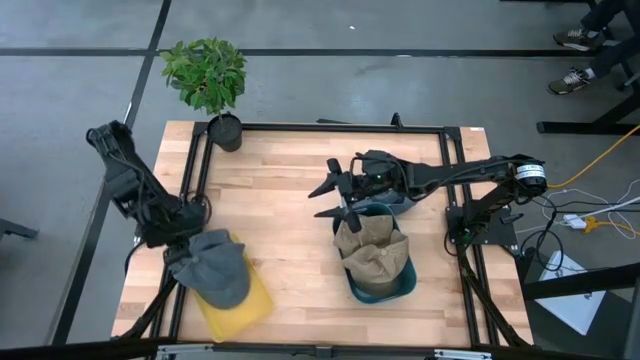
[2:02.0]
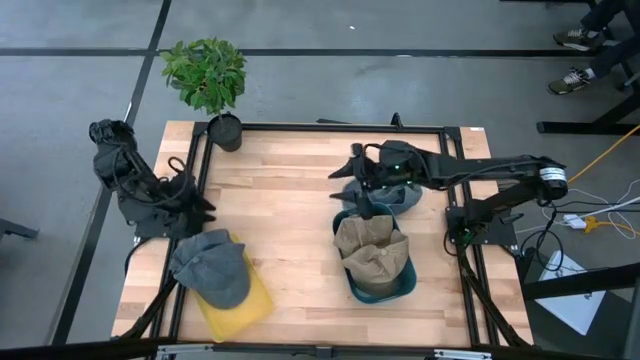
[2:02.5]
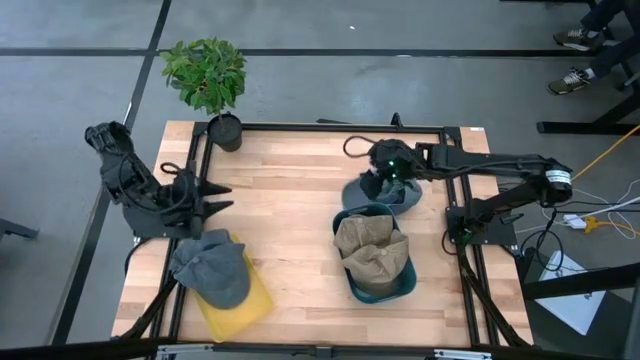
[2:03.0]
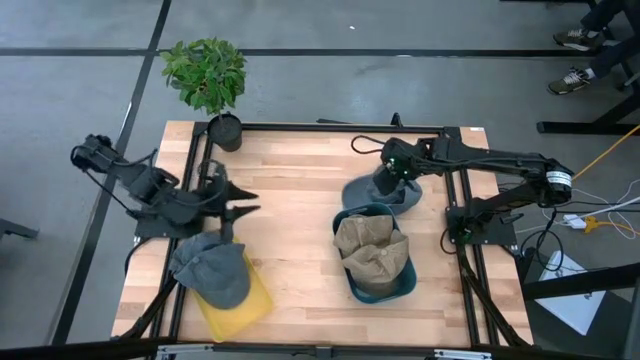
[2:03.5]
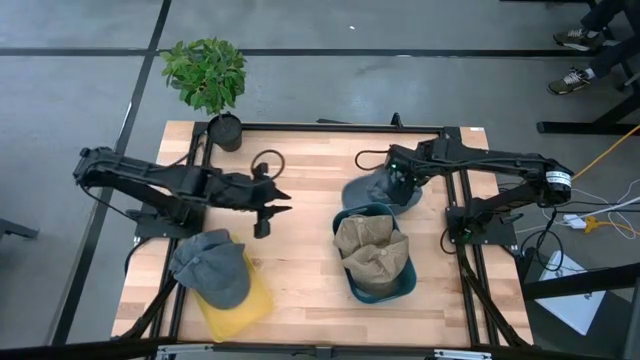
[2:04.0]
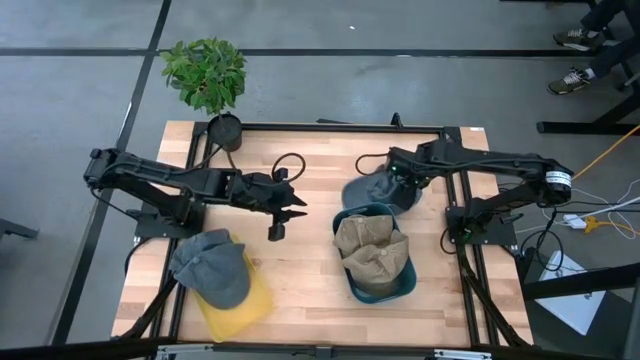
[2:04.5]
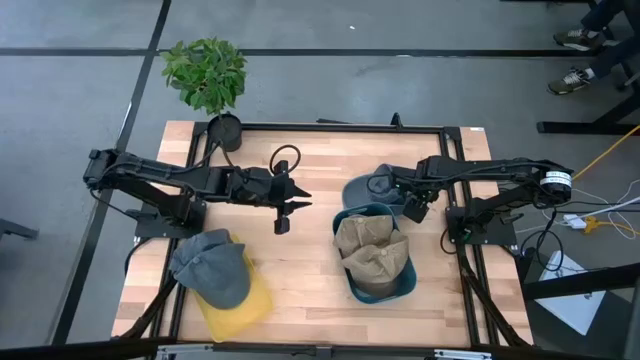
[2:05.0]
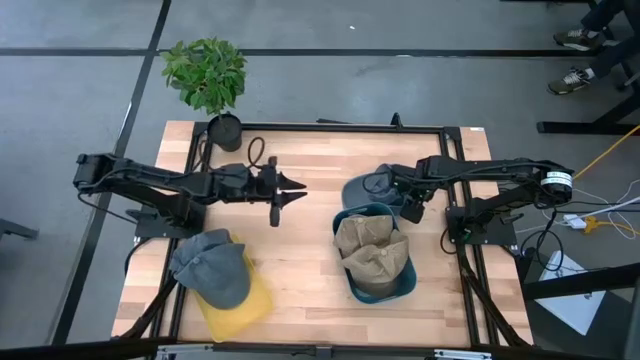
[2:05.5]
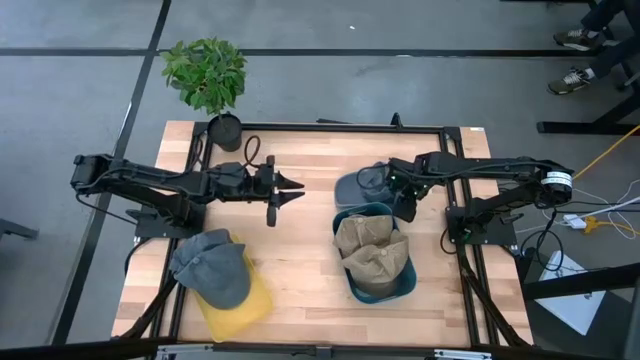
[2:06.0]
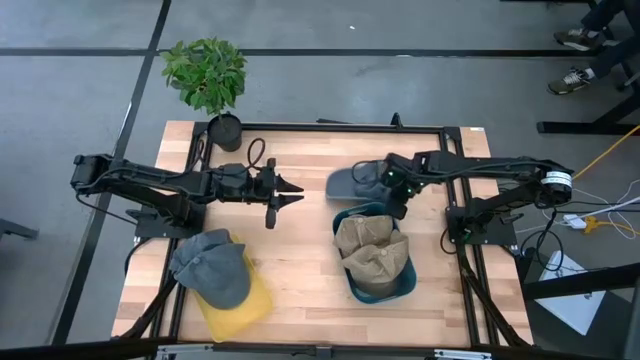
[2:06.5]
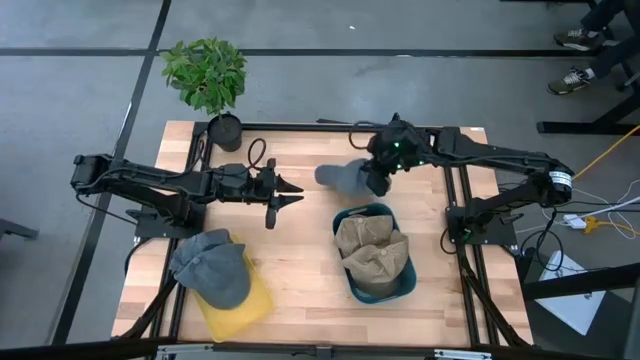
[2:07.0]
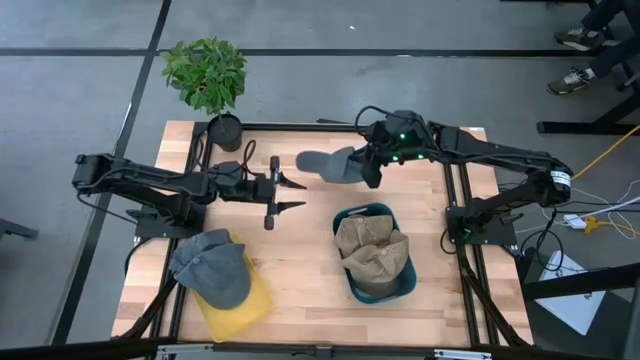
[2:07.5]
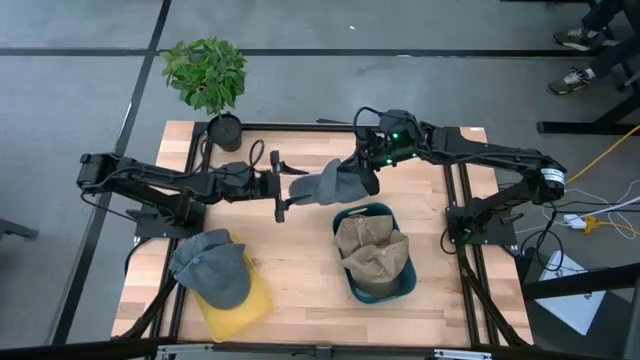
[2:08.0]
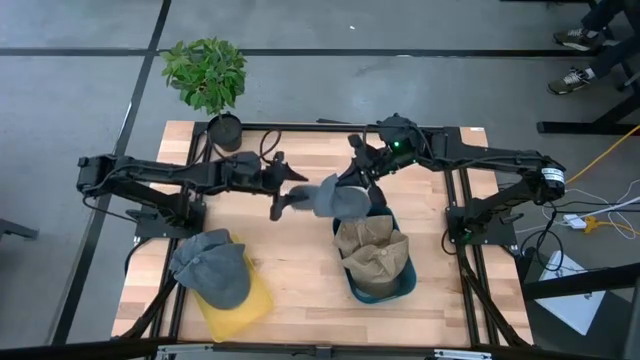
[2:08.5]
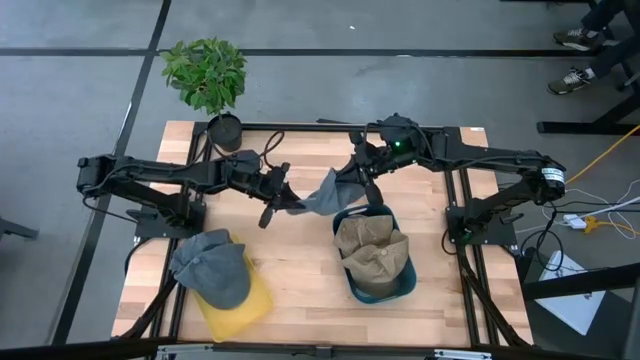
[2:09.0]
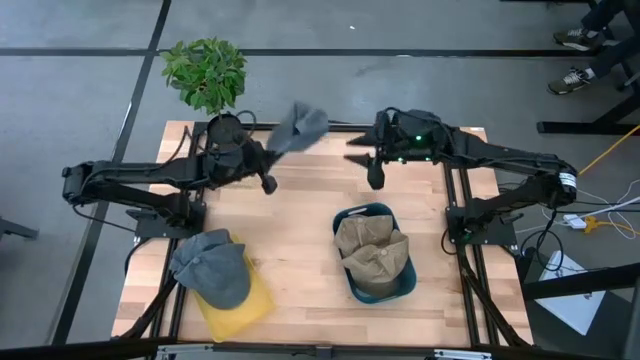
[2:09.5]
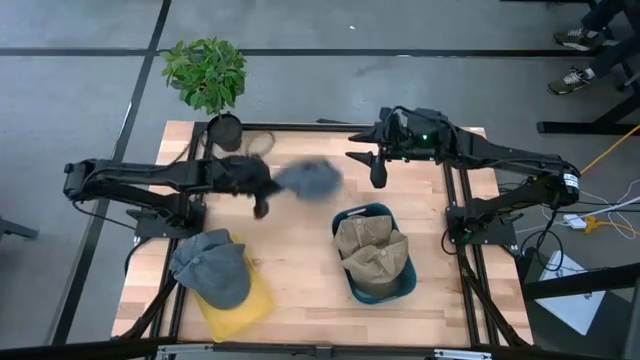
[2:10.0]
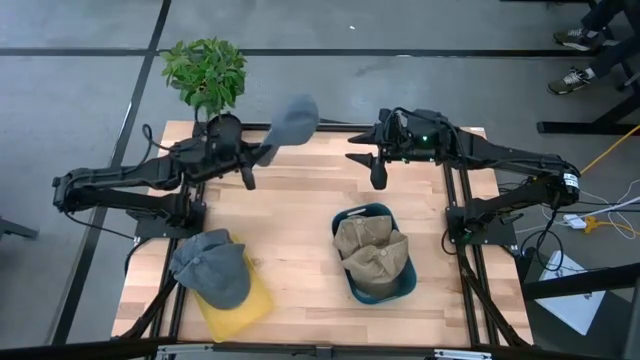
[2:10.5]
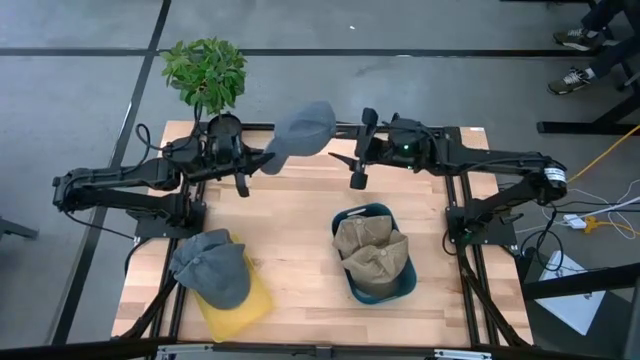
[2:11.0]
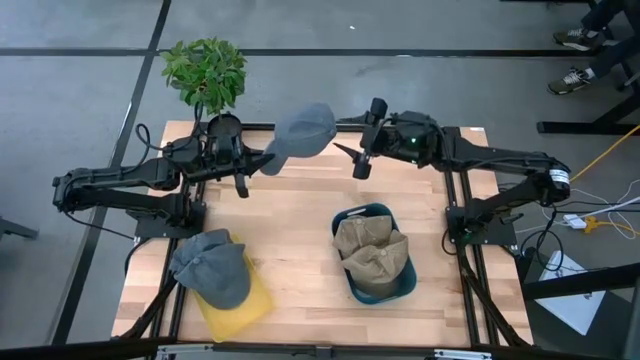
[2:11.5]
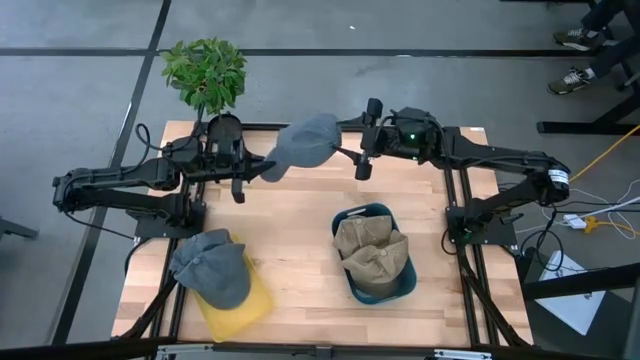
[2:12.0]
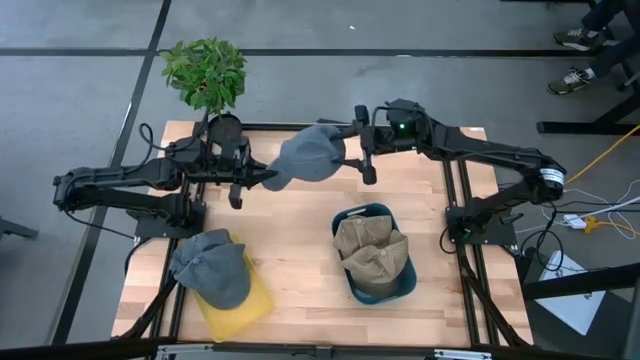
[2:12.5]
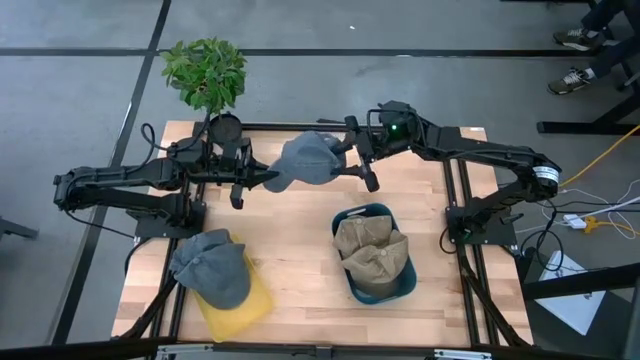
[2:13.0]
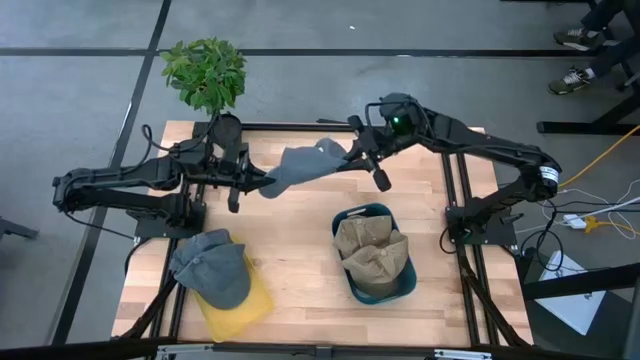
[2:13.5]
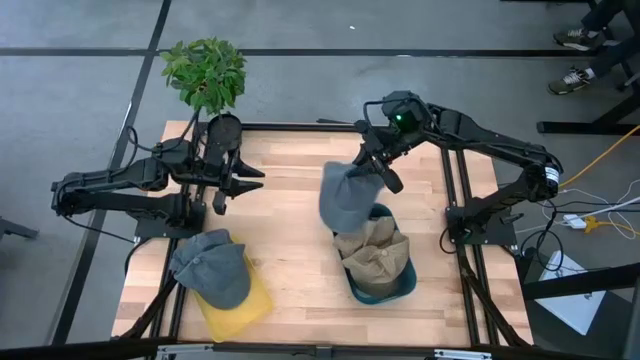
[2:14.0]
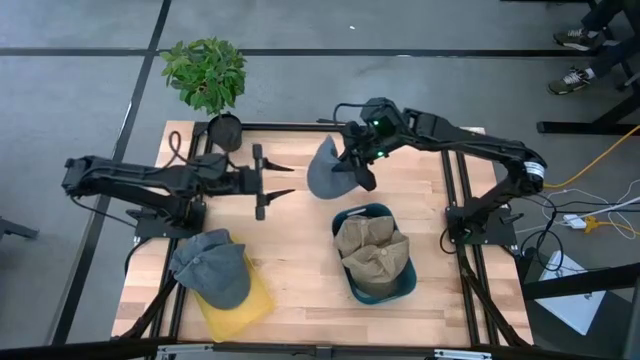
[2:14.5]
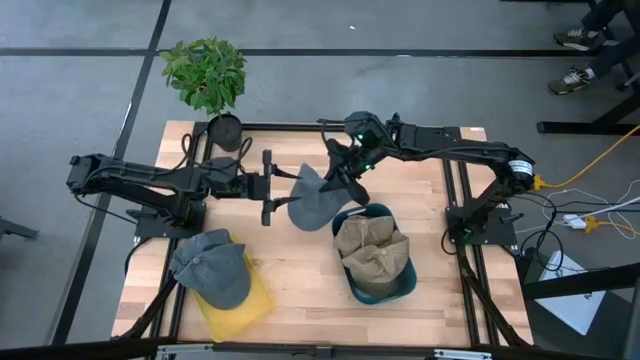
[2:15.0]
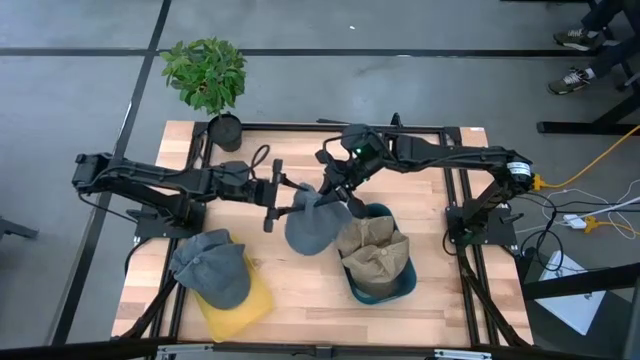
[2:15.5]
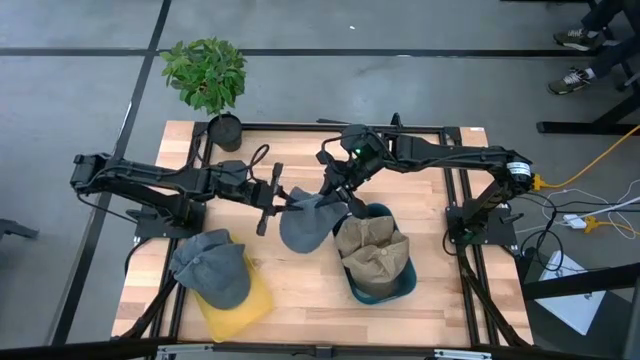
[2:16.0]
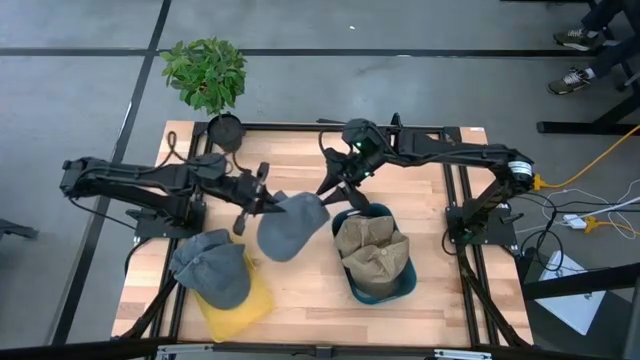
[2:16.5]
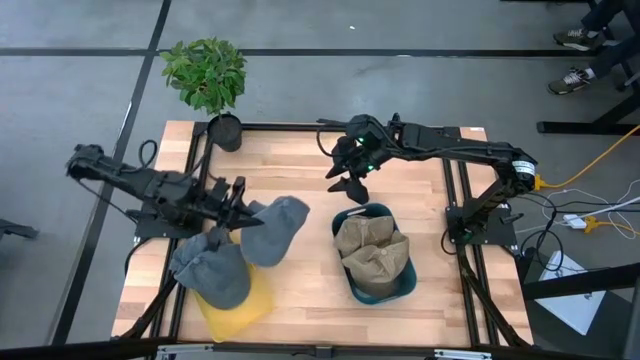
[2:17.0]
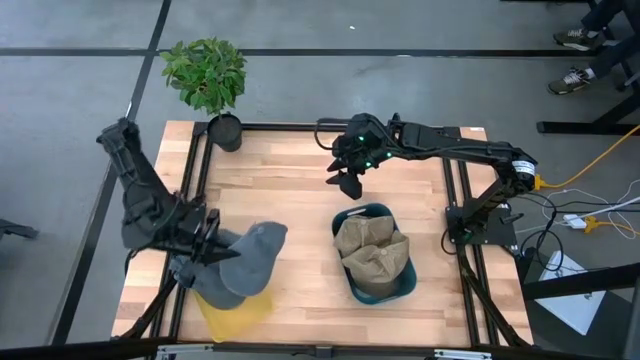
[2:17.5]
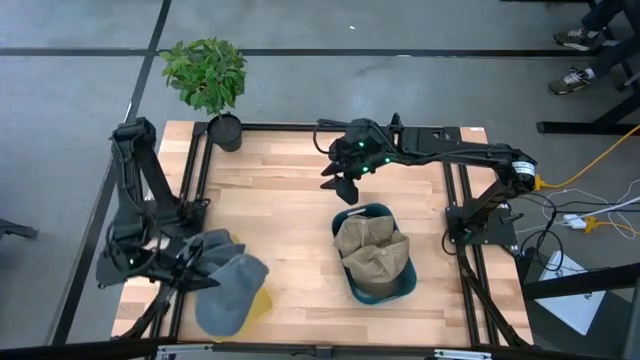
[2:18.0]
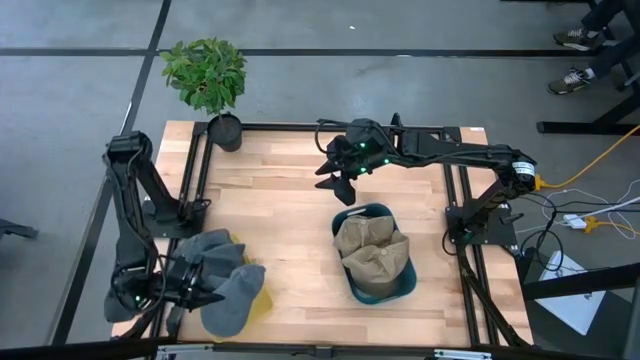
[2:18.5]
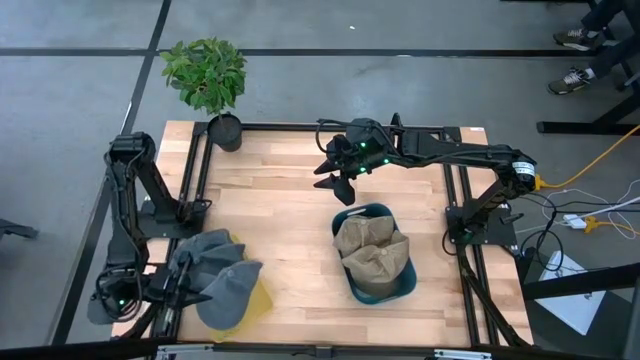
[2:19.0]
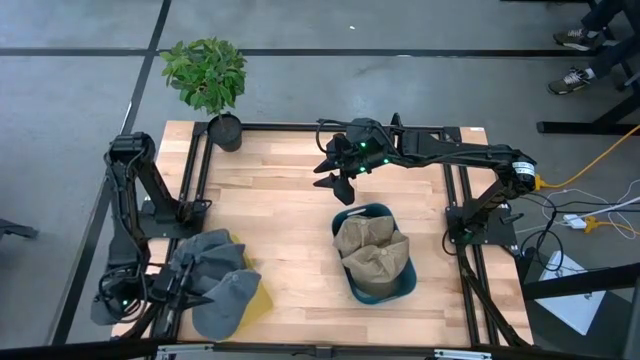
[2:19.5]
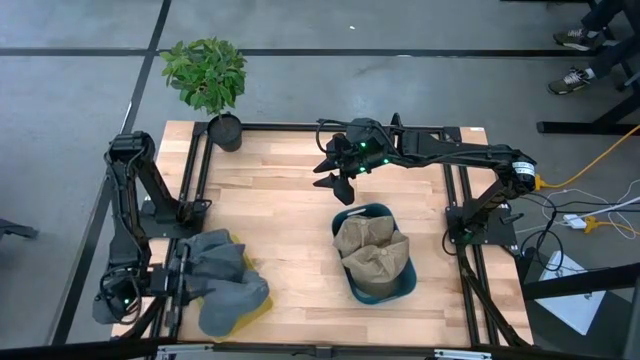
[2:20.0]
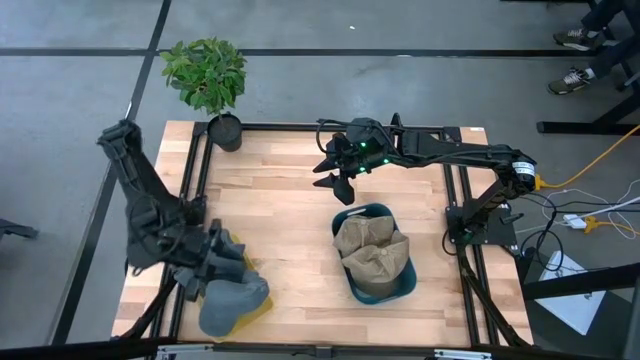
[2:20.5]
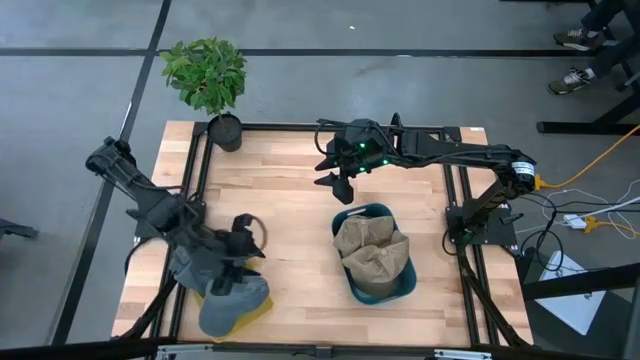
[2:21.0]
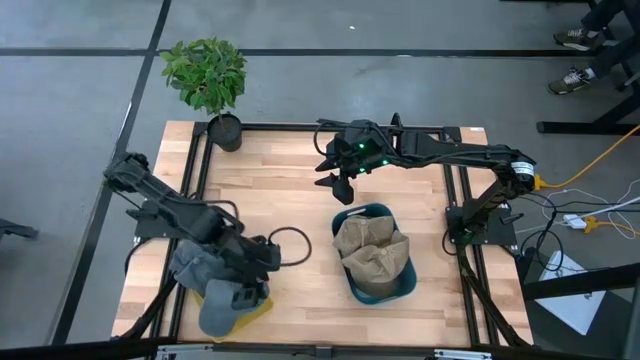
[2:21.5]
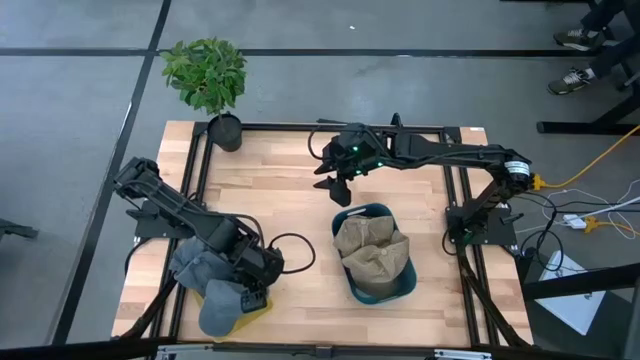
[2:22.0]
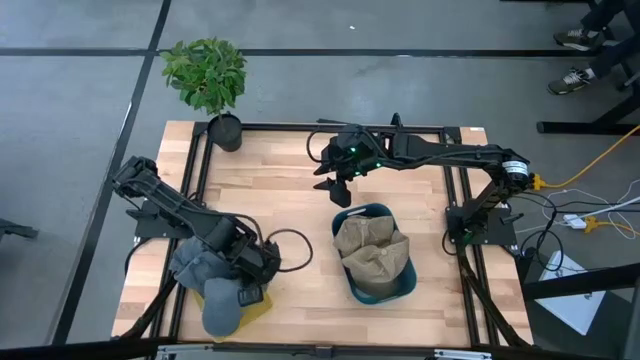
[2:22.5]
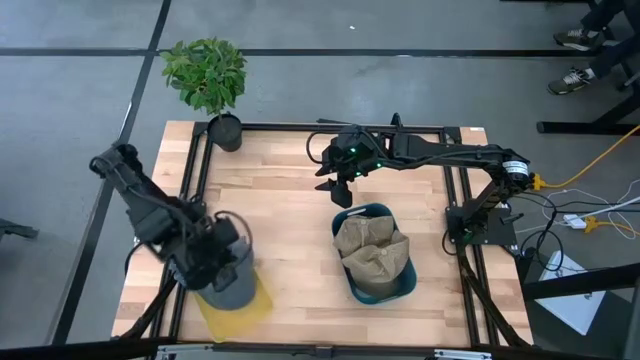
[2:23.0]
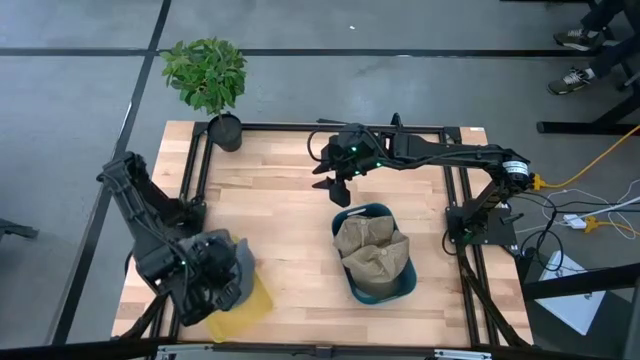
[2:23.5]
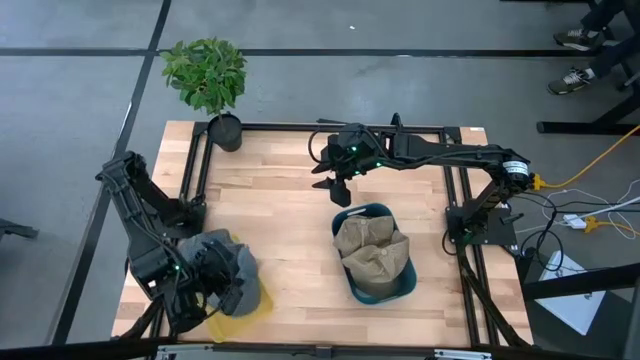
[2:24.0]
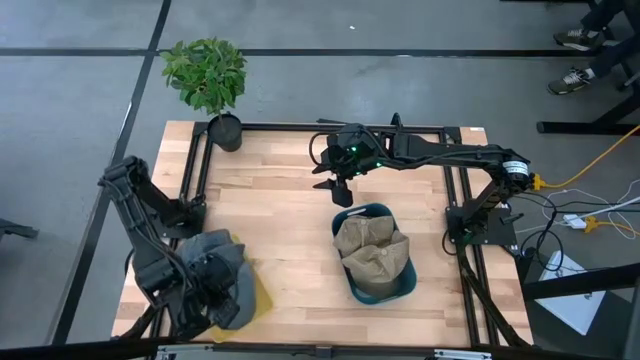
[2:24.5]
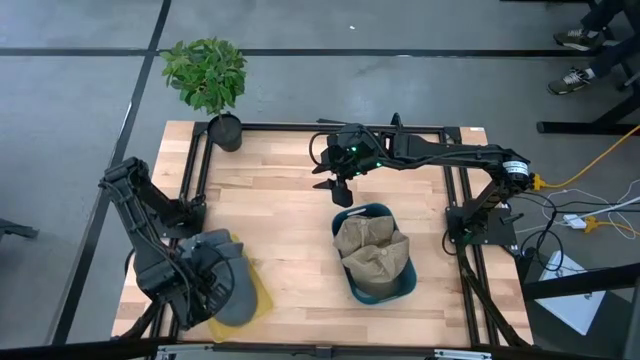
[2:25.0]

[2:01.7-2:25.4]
Task: Pick & Place hat
Put the blue cap into the yellow bin
